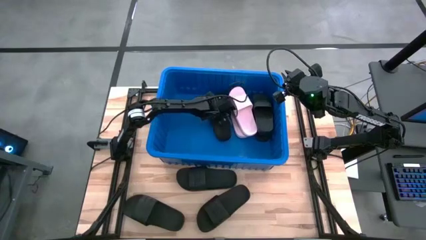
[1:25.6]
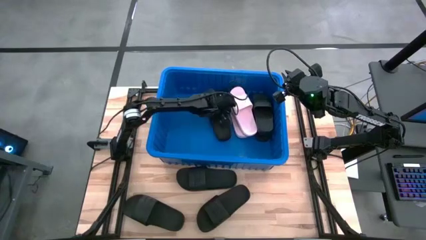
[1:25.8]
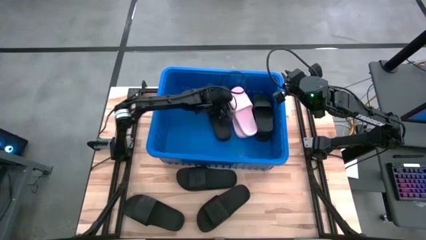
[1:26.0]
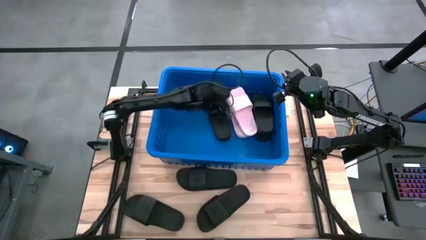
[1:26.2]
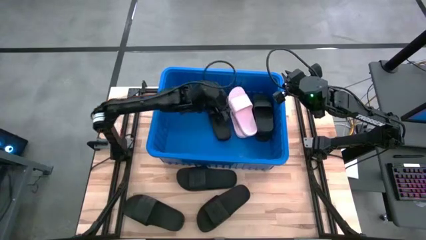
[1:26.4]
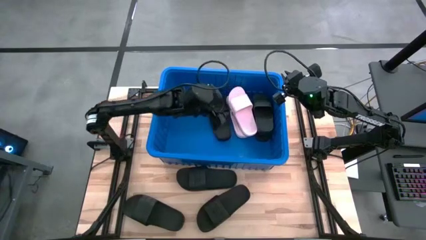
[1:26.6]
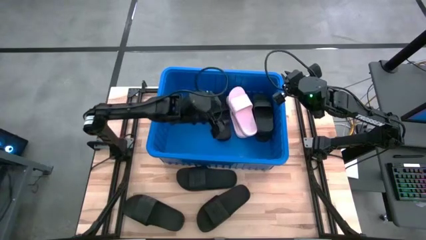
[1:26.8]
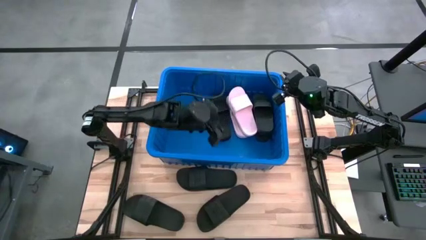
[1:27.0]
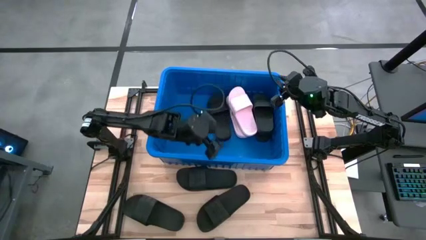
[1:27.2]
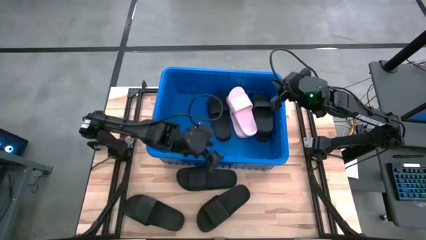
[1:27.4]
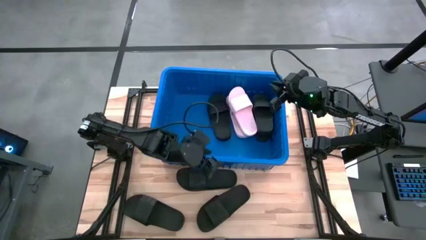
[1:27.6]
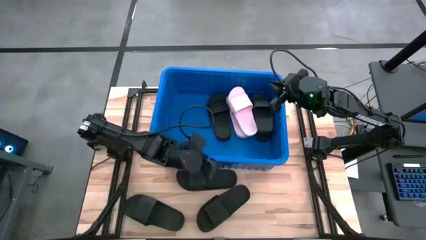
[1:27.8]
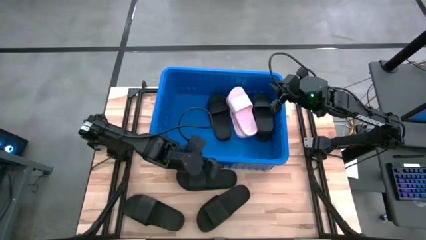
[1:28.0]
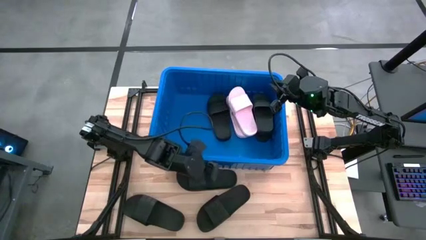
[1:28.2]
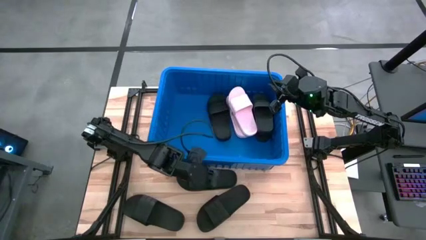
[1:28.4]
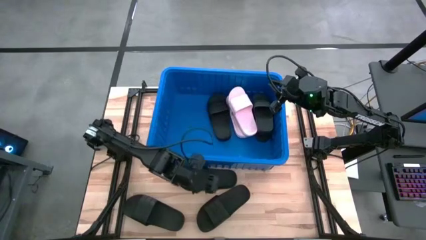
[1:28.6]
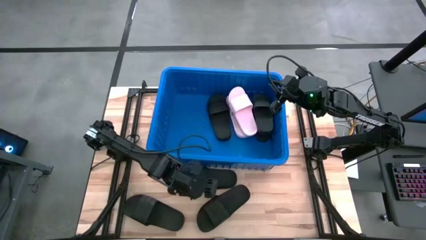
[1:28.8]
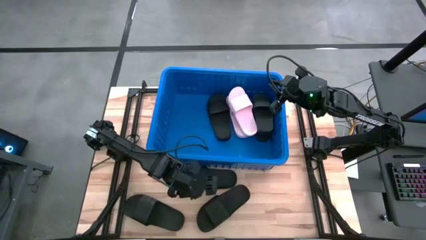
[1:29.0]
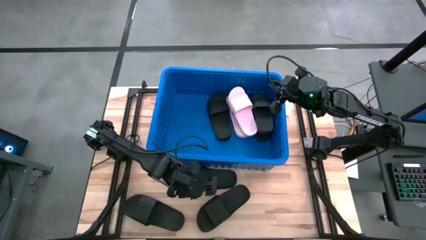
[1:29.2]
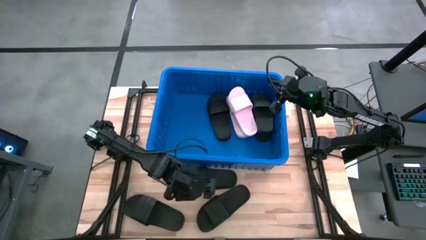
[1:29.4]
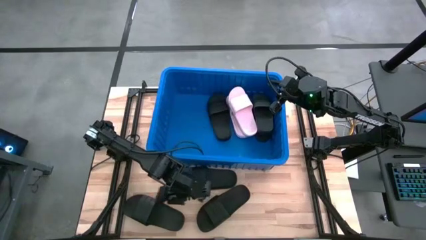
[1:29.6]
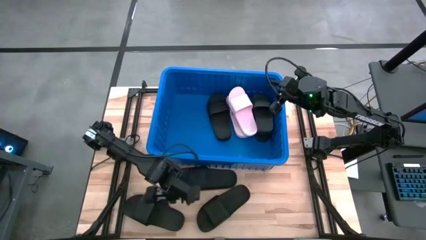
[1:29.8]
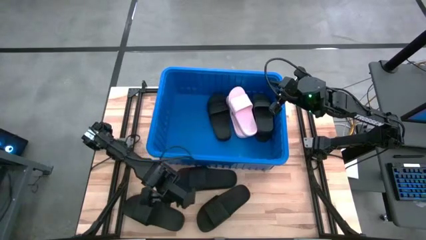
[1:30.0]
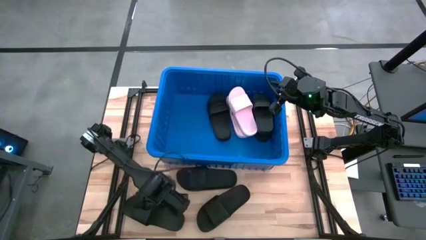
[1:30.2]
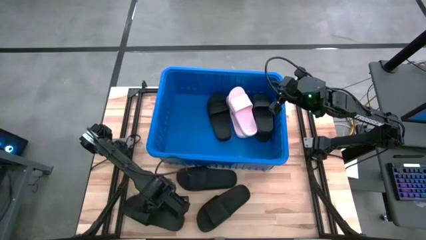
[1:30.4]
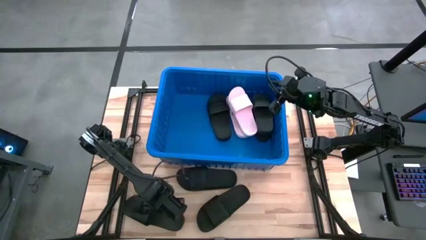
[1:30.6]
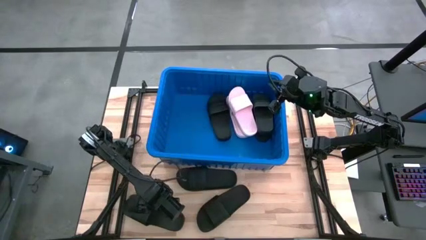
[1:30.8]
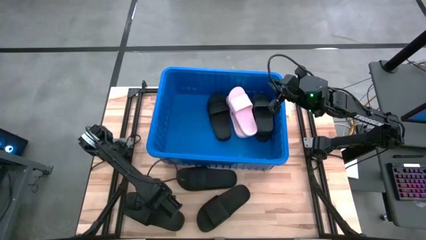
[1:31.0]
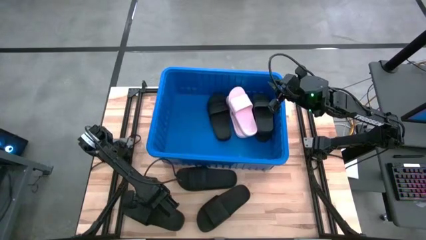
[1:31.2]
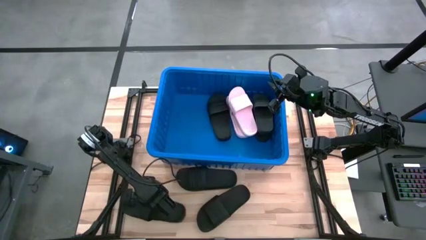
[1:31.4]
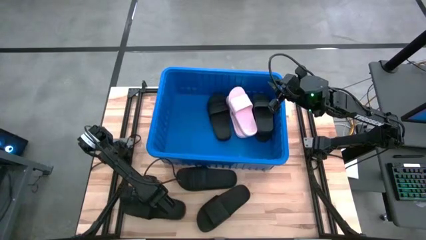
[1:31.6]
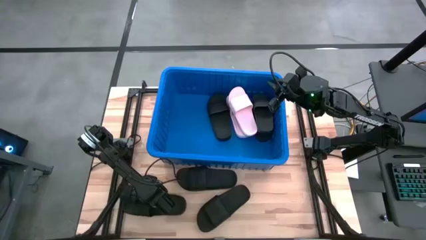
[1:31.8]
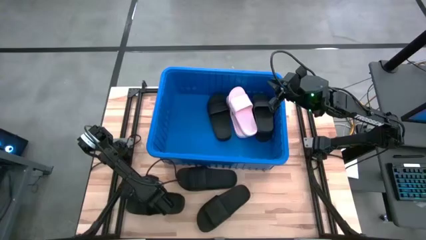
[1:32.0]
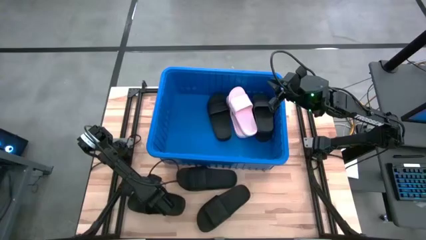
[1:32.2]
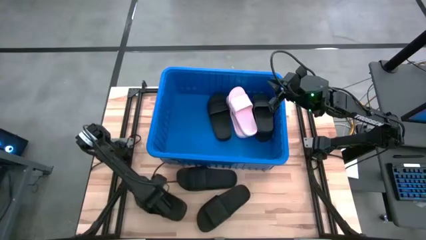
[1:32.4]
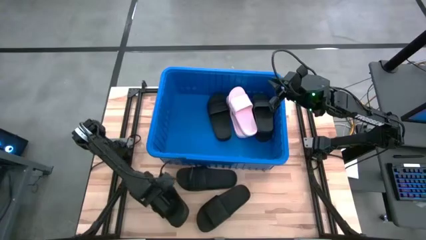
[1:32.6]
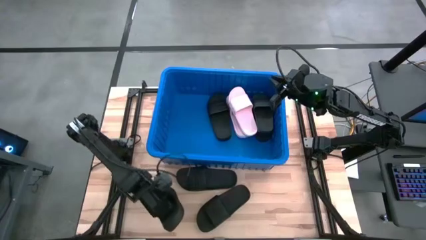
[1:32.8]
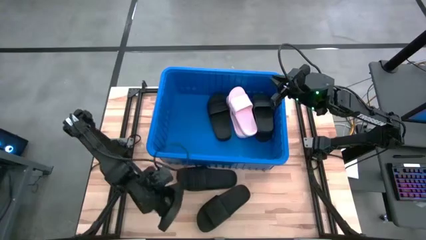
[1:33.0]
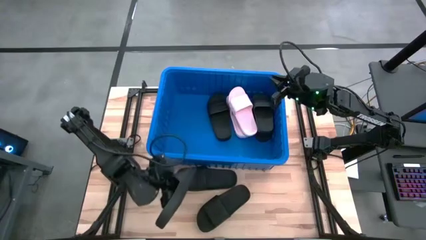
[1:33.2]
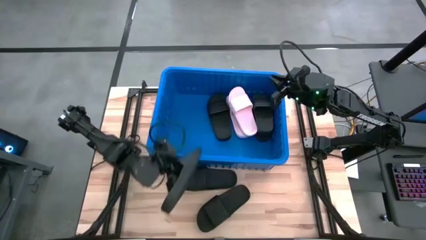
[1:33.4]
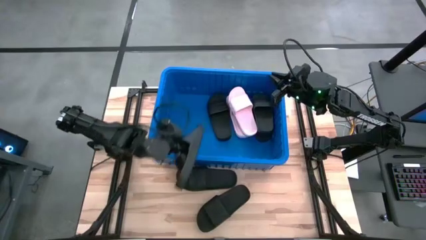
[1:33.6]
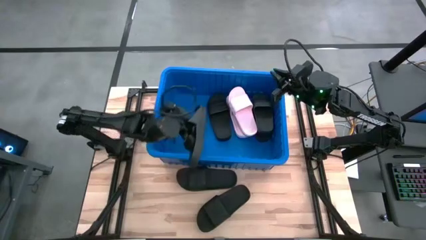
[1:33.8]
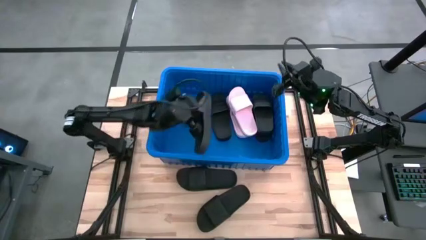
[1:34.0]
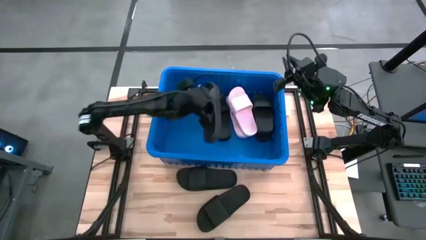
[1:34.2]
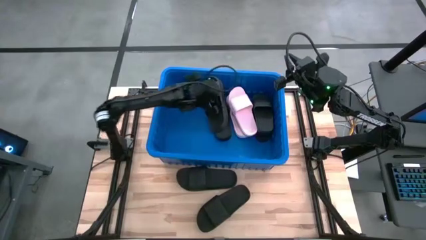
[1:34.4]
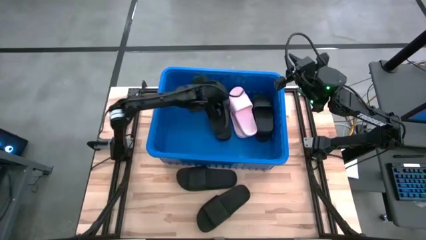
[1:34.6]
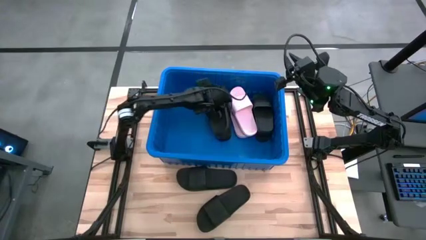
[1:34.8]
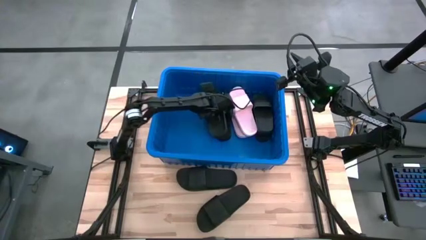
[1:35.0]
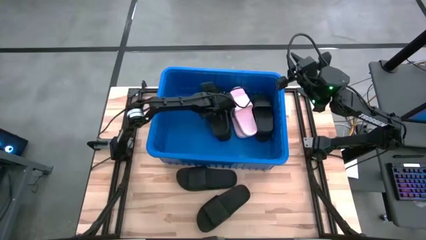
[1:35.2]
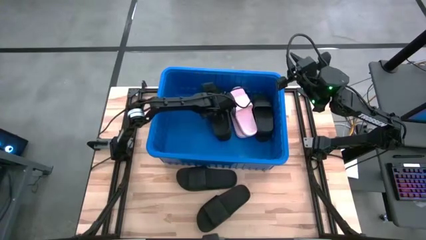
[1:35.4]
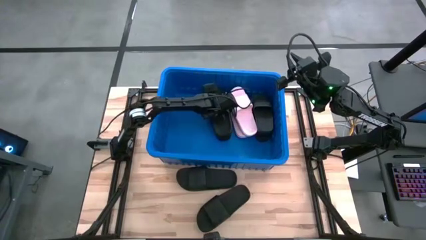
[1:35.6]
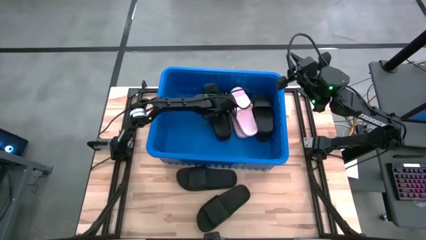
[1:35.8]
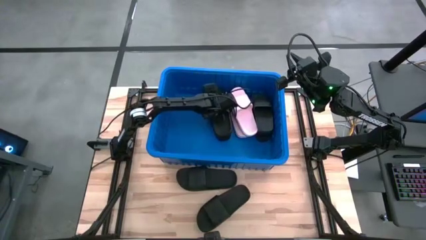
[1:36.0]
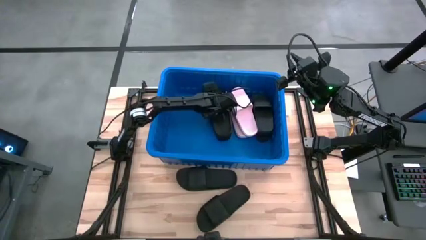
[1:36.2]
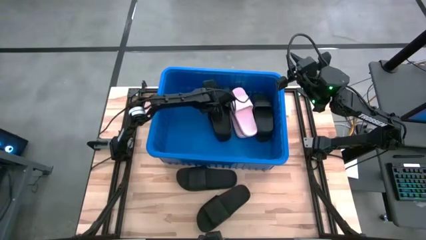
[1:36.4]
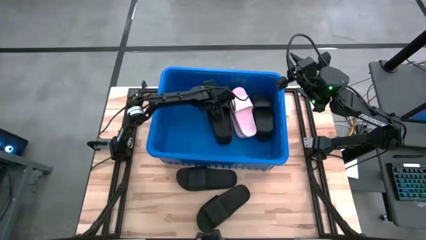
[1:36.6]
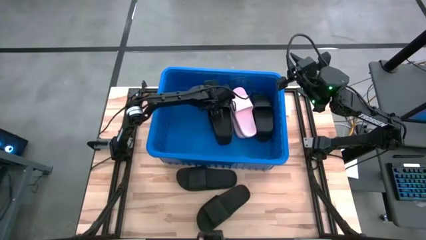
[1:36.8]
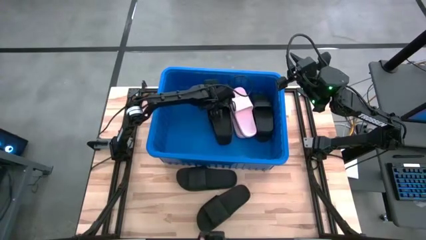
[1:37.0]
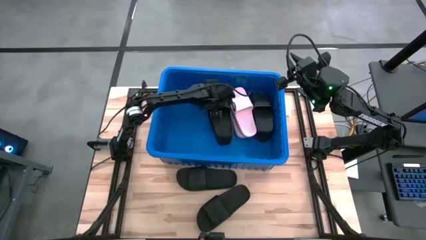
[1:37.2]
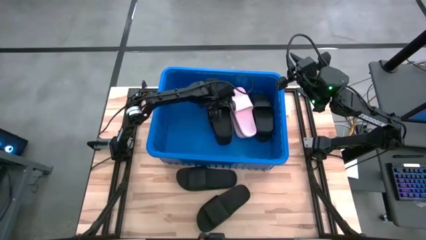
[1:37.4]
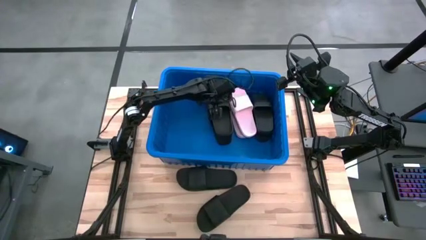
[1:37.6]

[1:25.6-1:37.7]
Task: Pick and place slides into bin
Put the black slide into the blue bin
